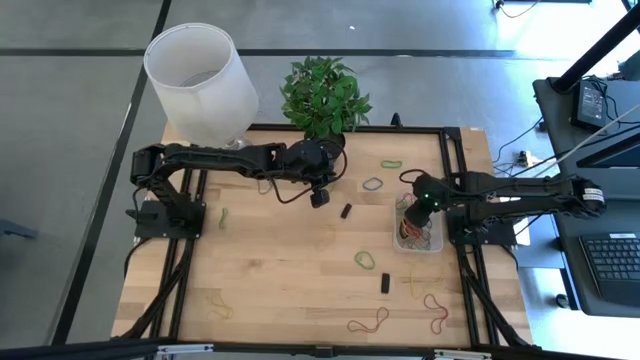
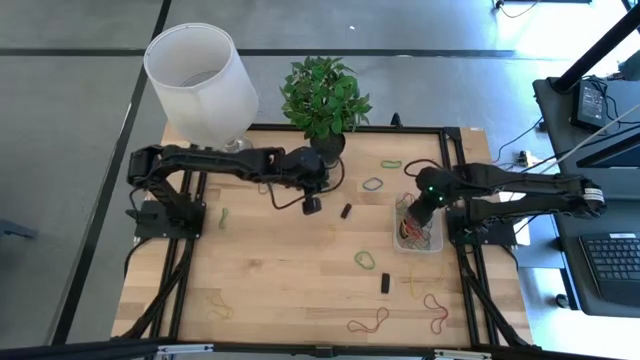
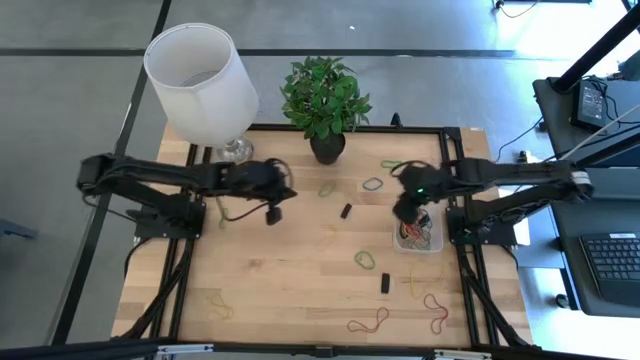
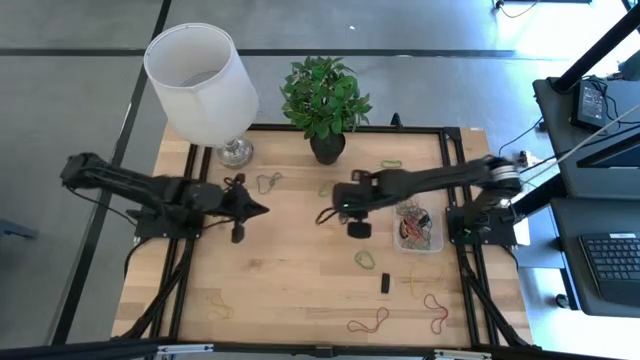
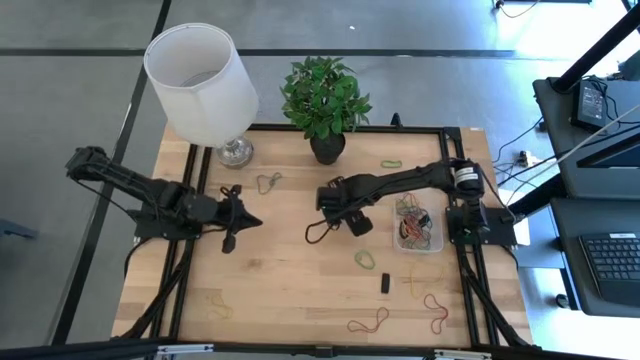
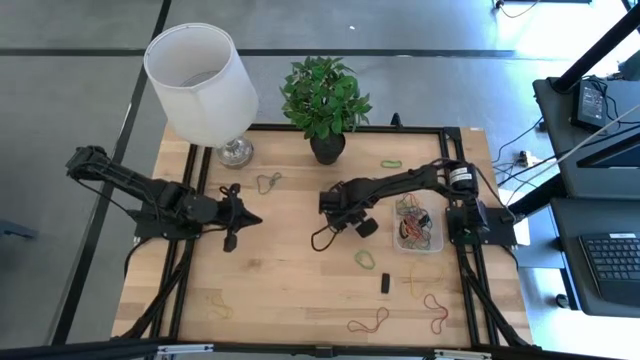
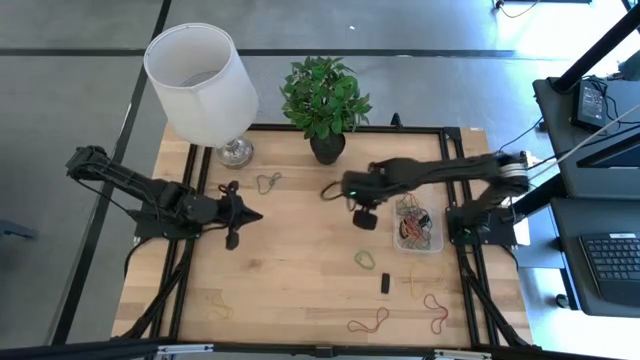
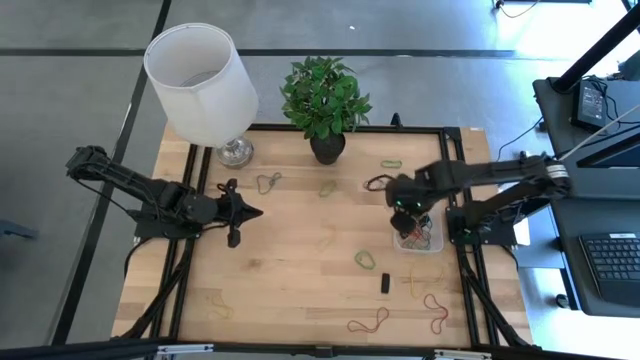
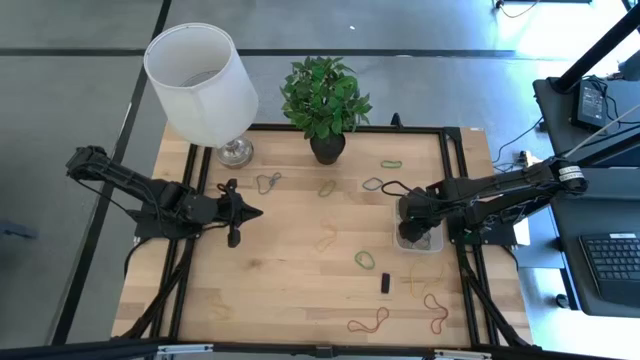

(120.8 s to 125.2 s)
Task: Pick and place rubber bands into bin
Put the black rubber band into the transparent bin

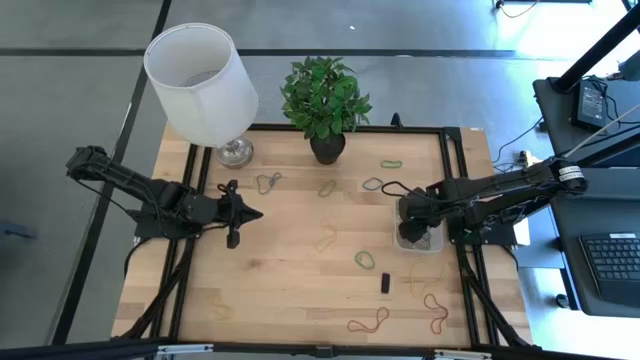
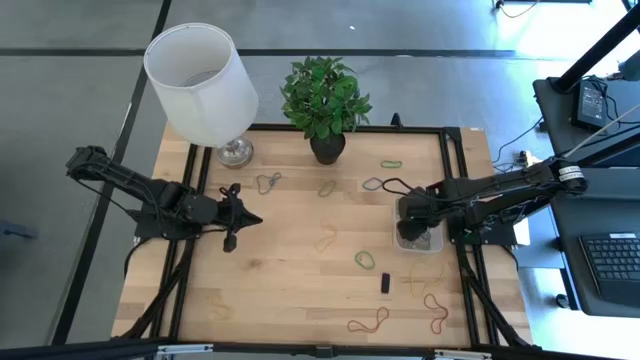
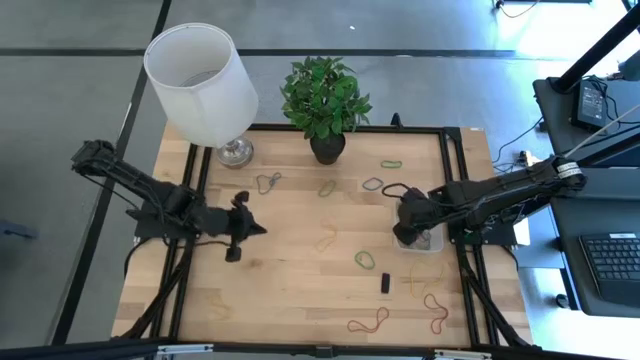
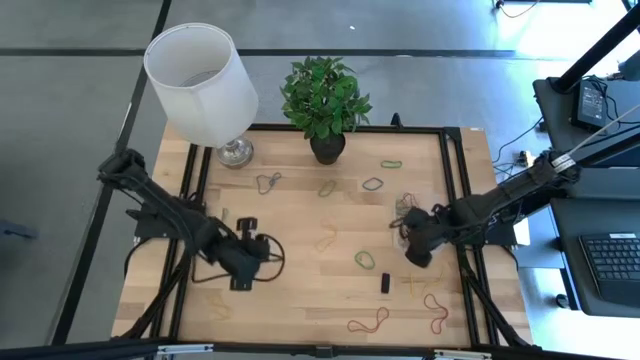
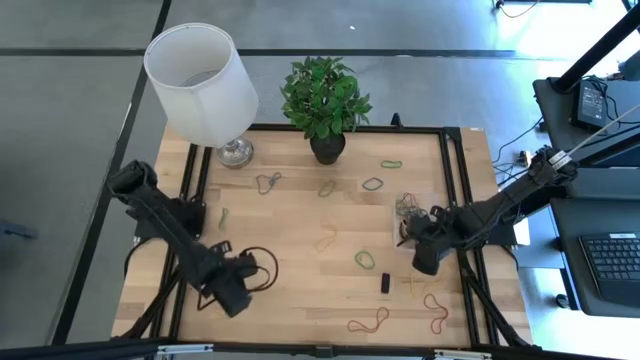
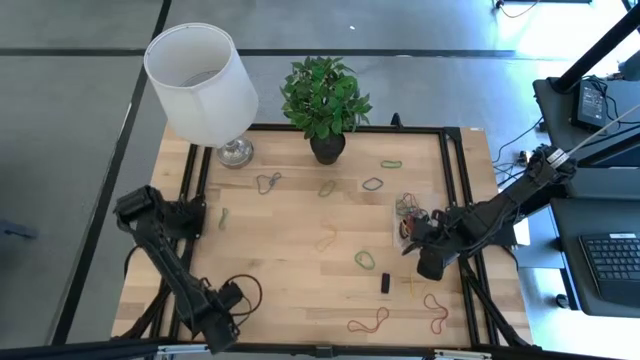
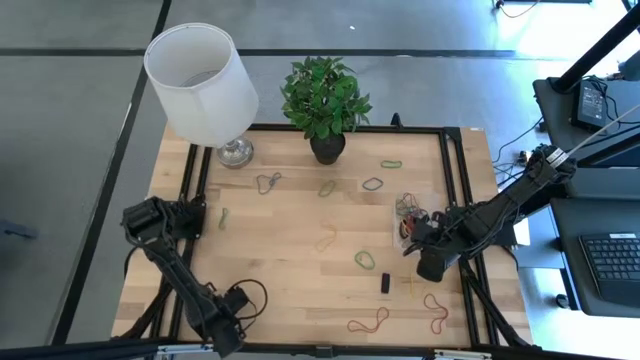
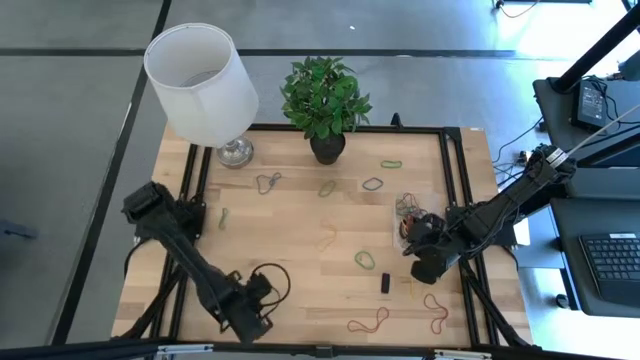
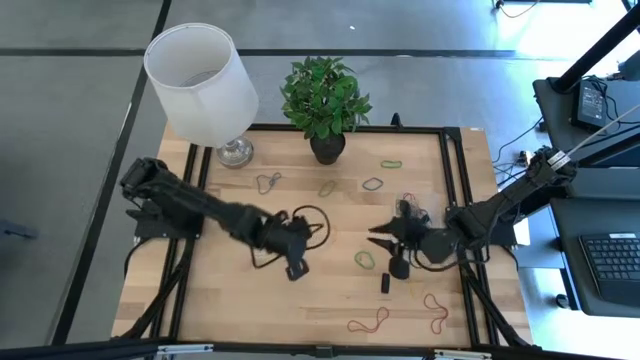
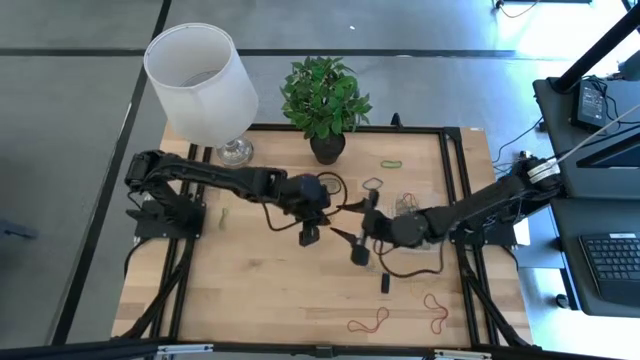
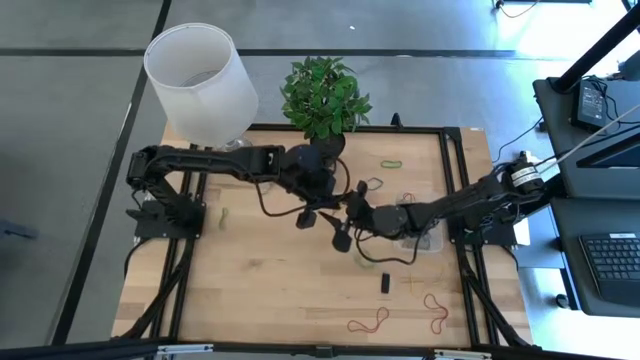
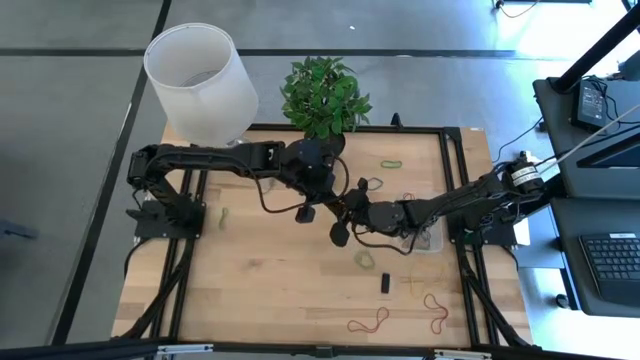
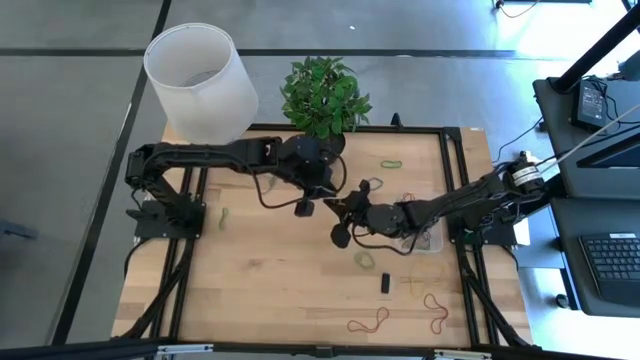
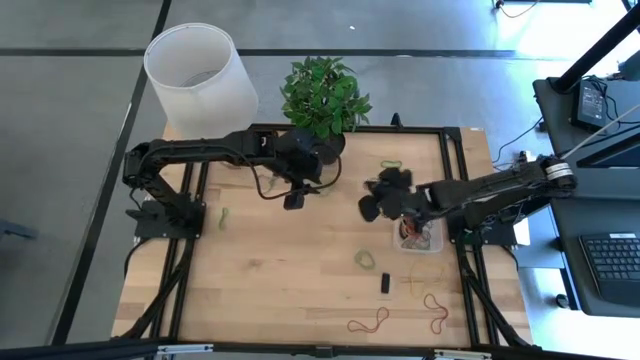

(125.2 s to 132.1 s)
Put the yellow rubber band into the transparent bin

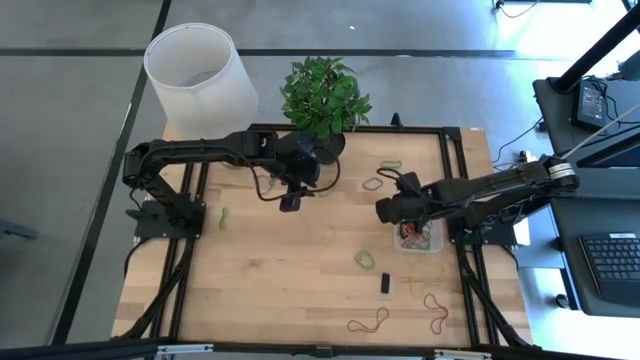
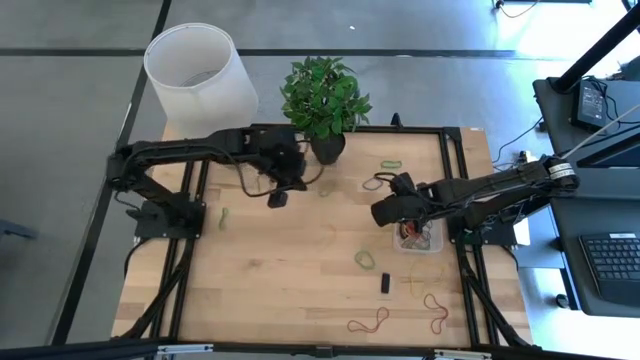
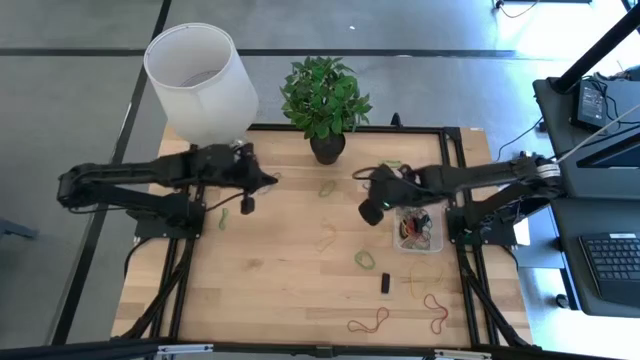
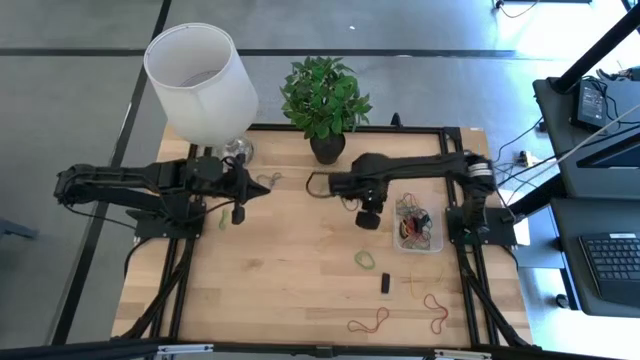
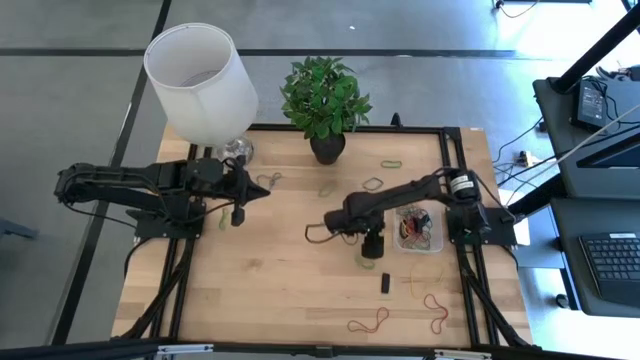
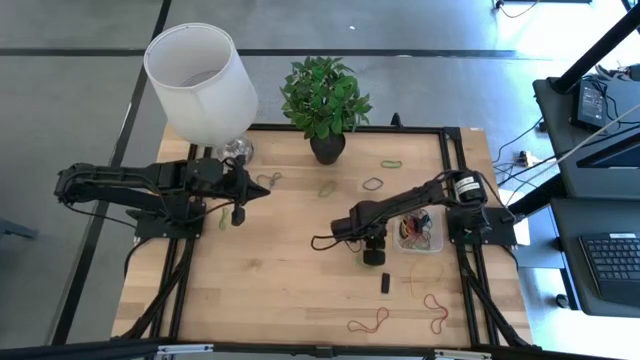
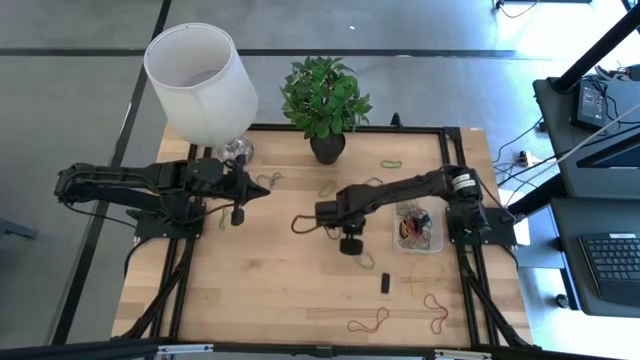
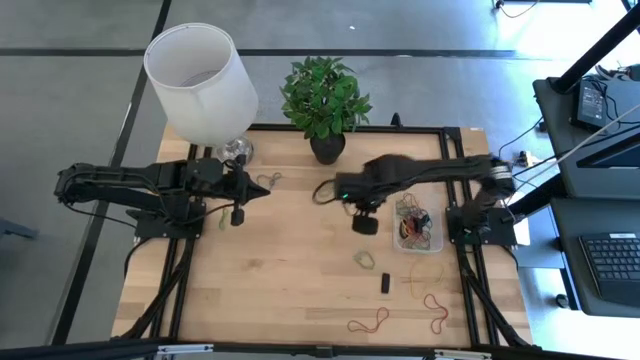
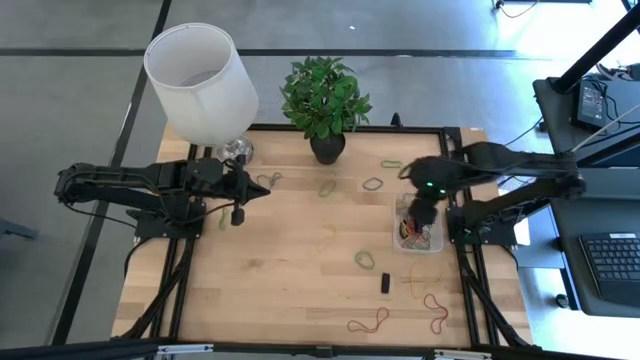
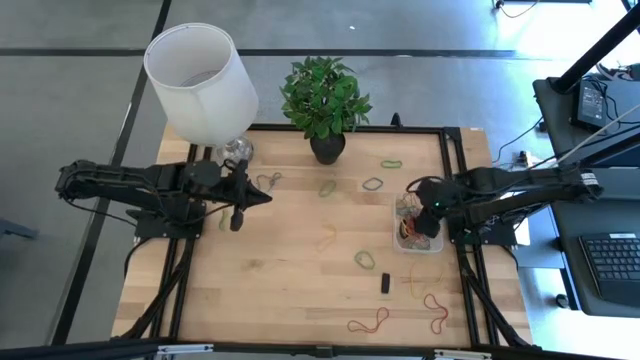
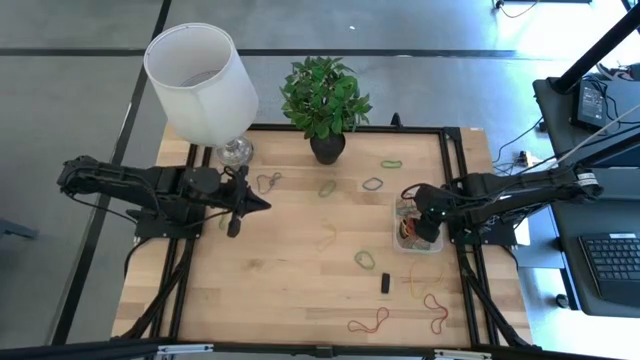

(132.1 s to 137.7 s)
Put the yellow rubber band into the transparent bin

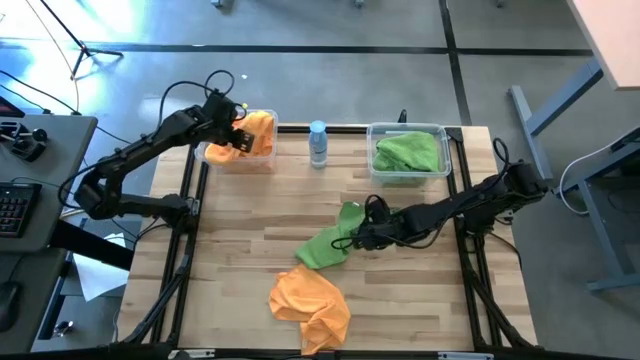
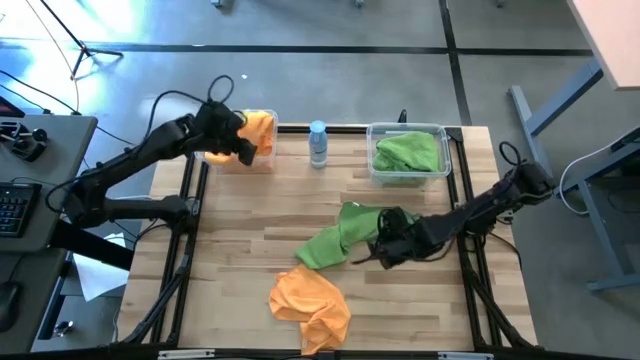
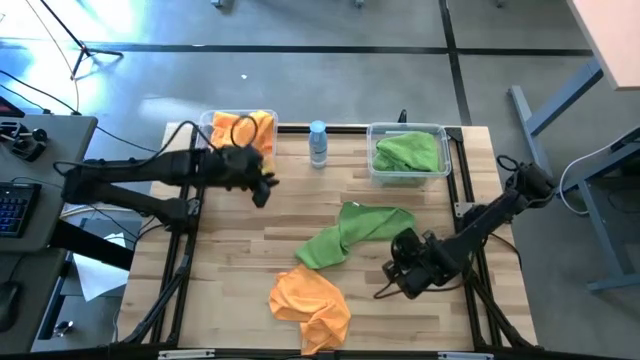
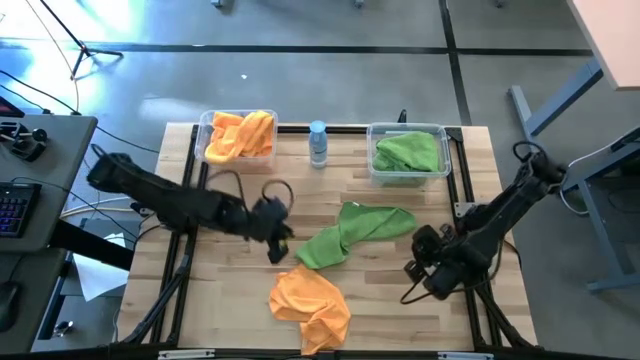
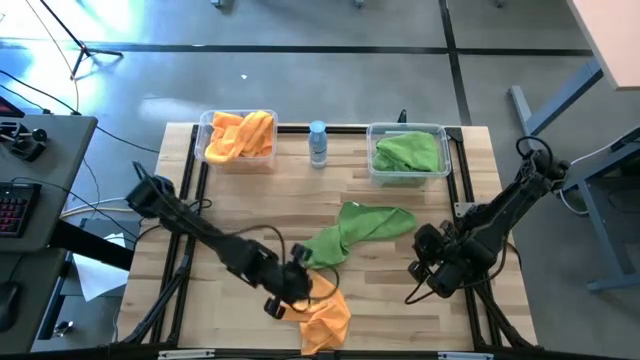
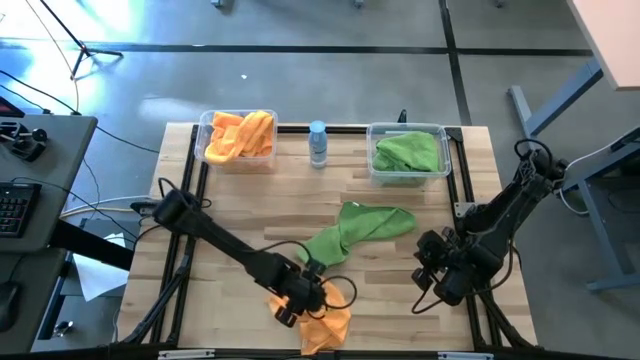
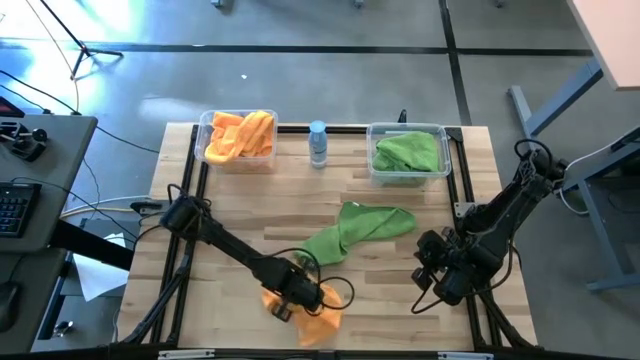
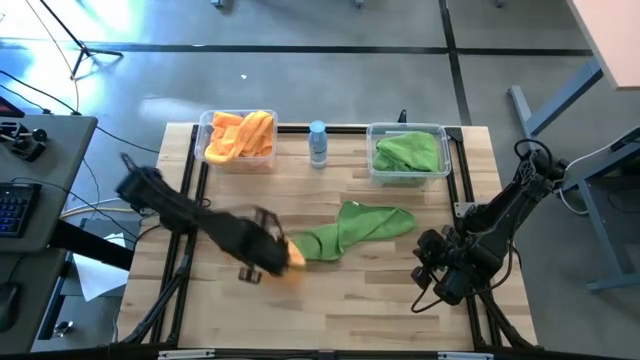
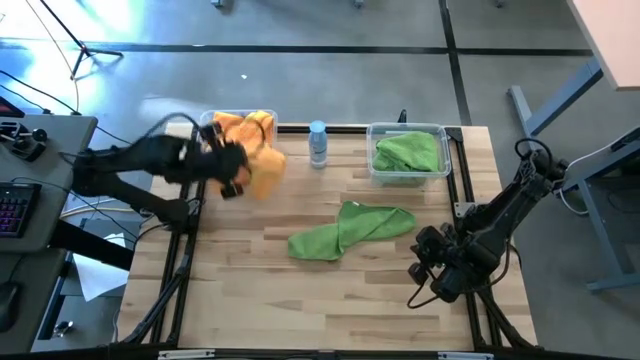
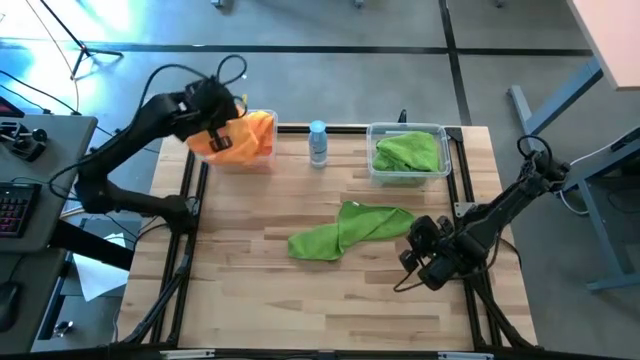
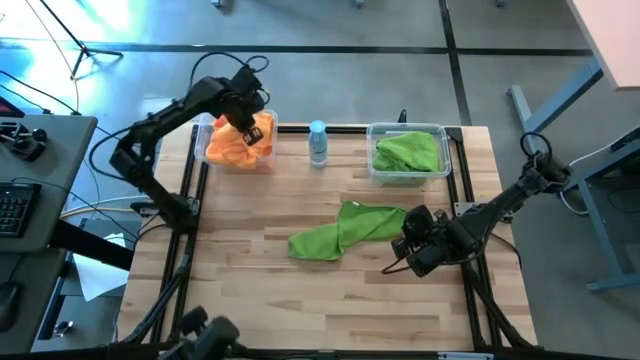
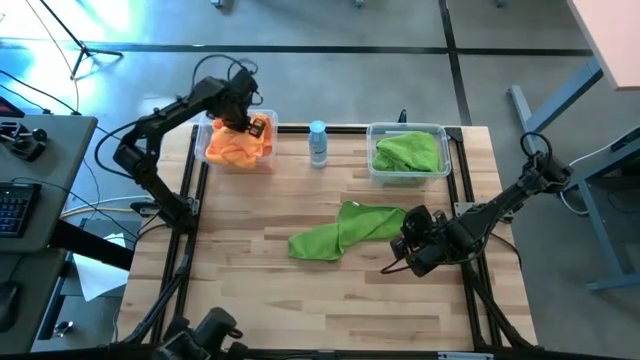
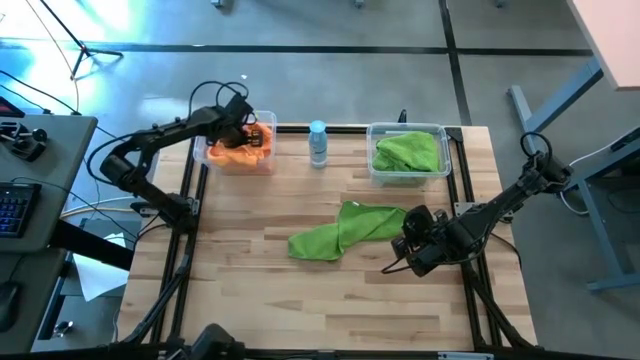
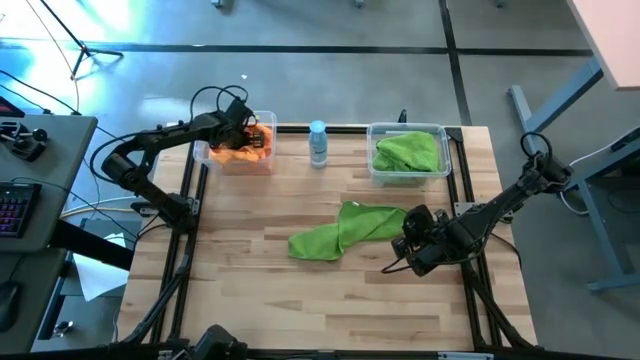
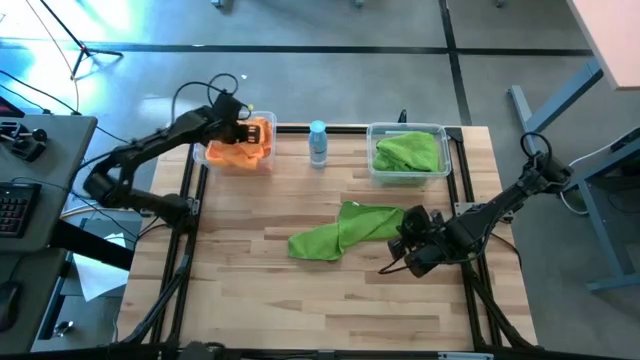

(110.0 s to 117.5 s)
Task: Sort microfiber towel by color & place in baskets
Put the orange towel into the left transparent bin
